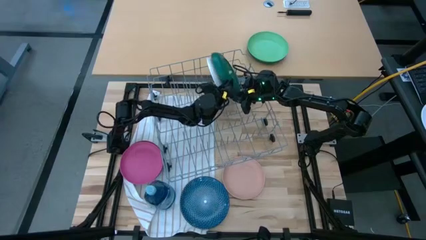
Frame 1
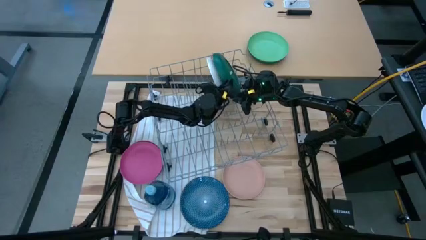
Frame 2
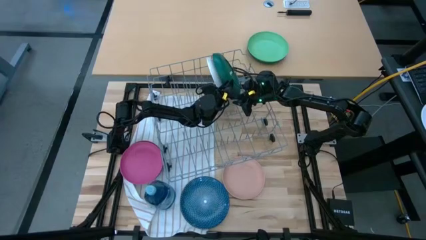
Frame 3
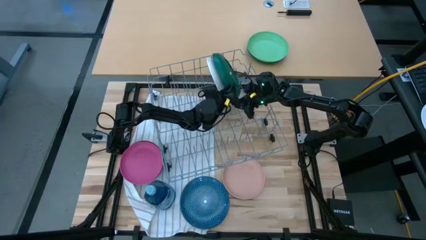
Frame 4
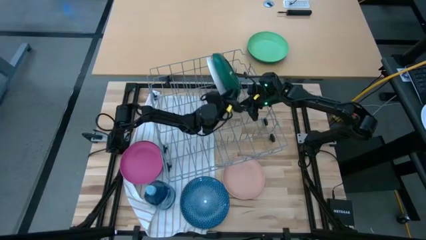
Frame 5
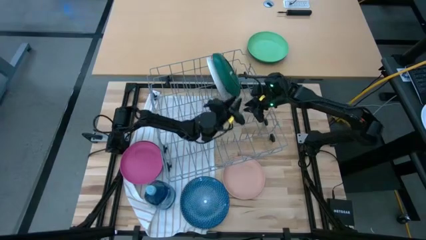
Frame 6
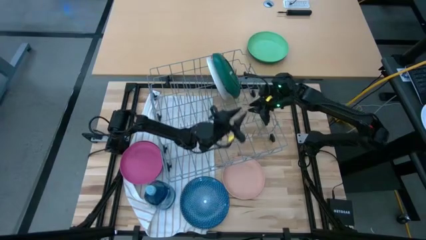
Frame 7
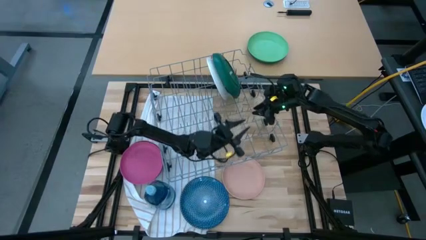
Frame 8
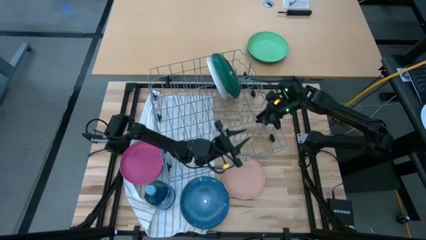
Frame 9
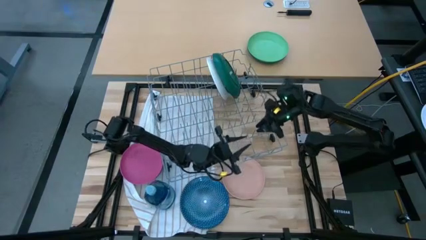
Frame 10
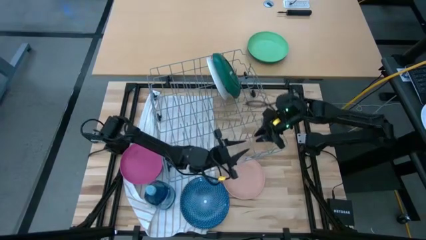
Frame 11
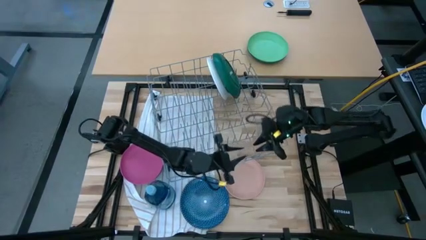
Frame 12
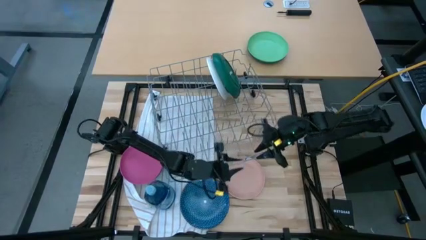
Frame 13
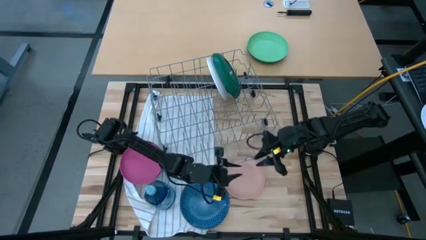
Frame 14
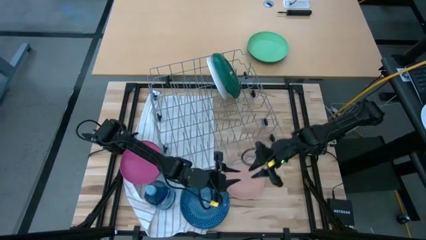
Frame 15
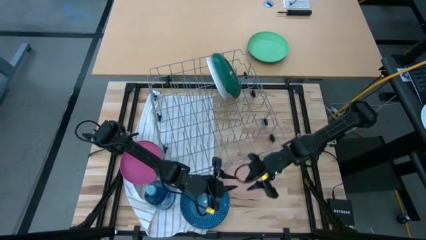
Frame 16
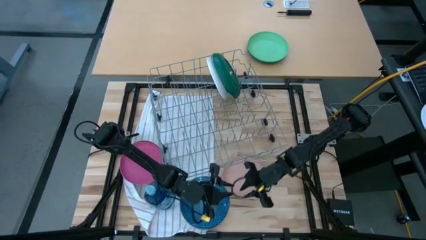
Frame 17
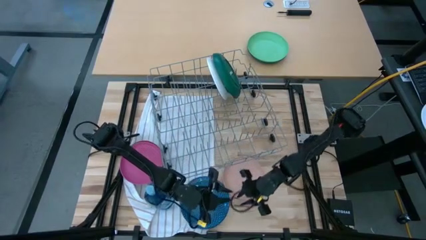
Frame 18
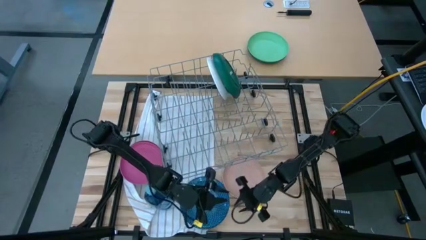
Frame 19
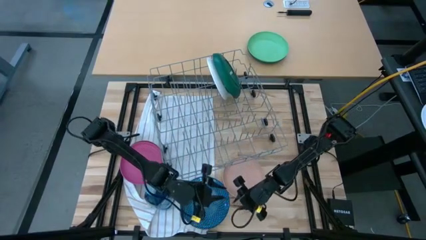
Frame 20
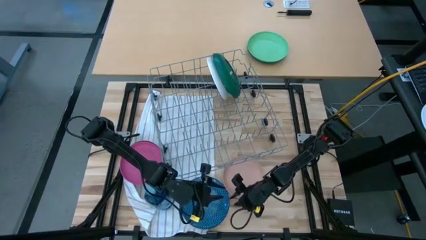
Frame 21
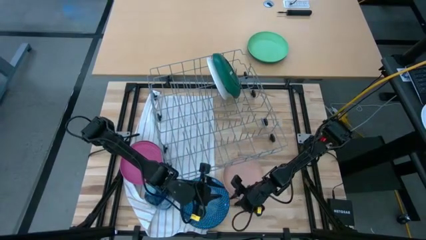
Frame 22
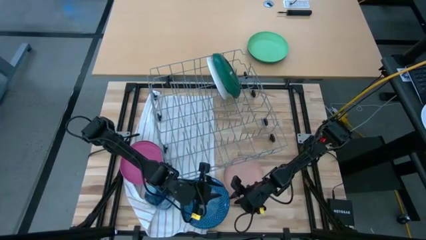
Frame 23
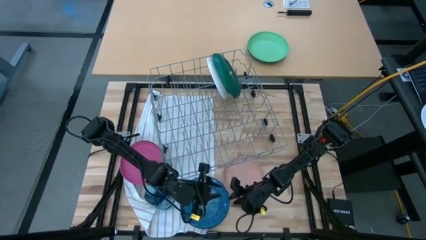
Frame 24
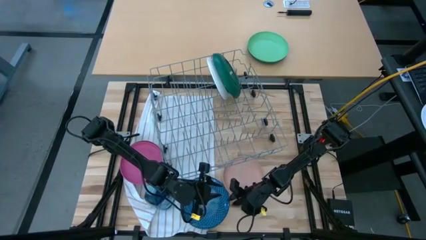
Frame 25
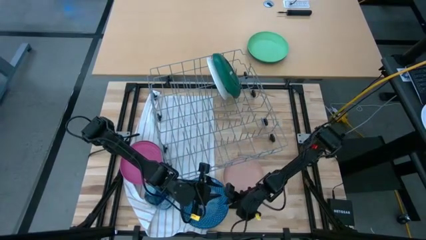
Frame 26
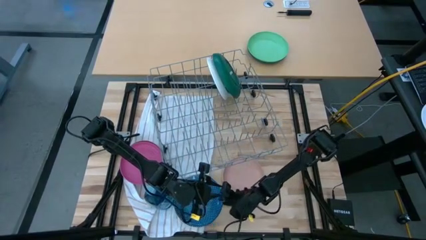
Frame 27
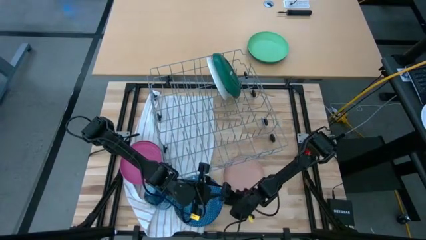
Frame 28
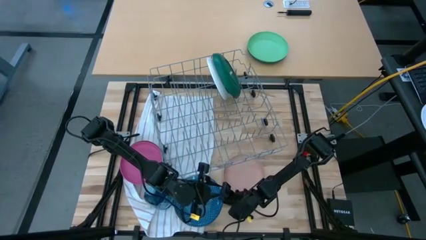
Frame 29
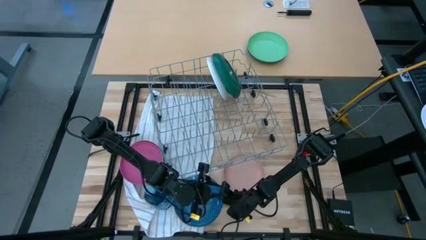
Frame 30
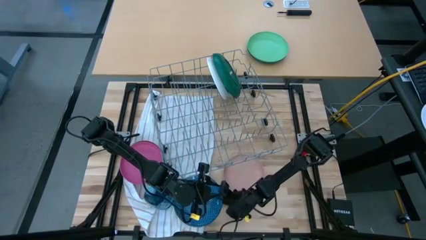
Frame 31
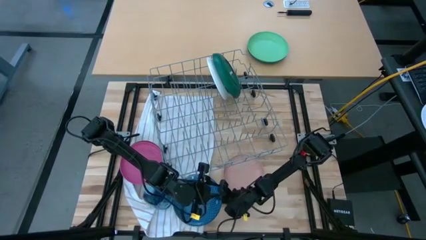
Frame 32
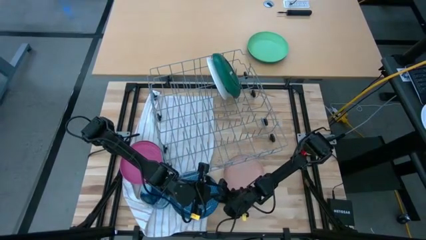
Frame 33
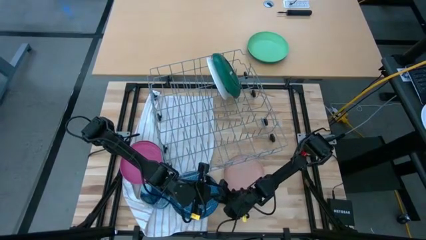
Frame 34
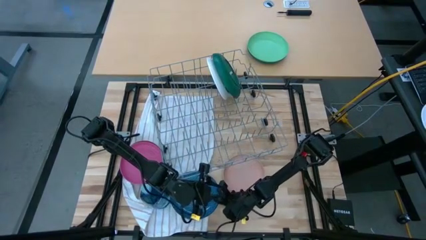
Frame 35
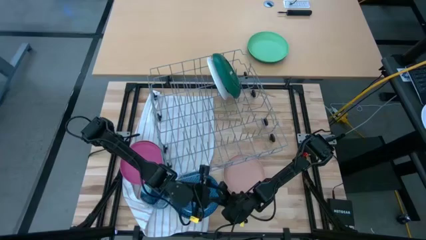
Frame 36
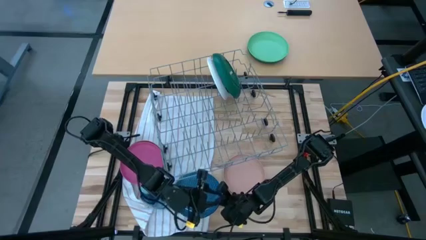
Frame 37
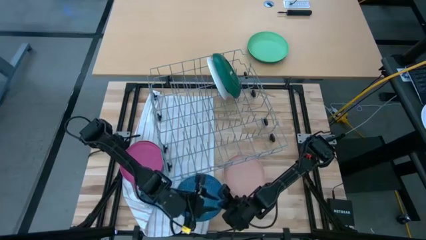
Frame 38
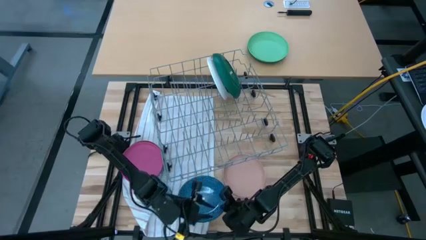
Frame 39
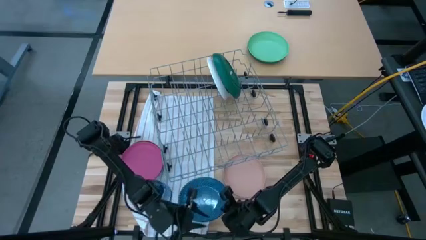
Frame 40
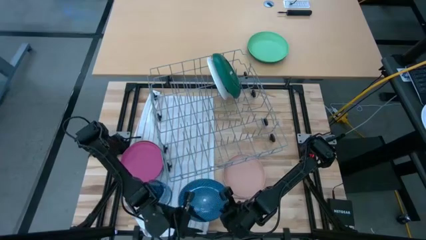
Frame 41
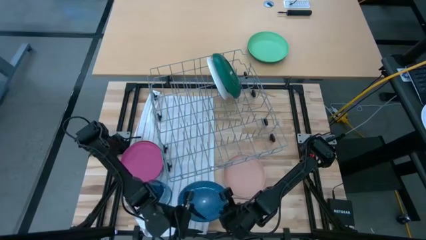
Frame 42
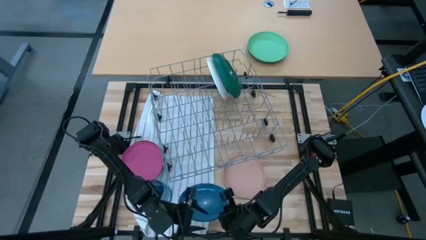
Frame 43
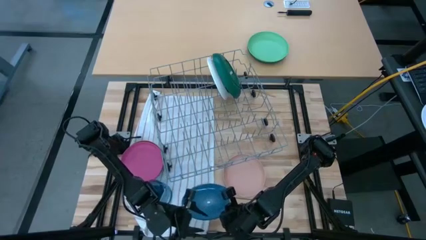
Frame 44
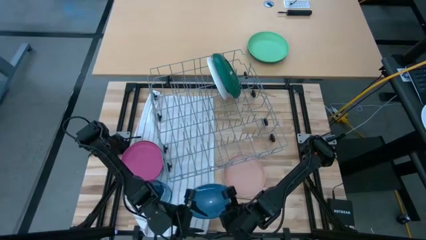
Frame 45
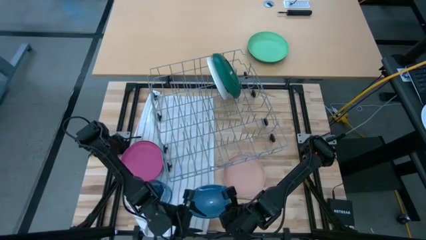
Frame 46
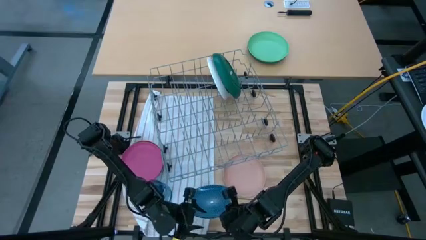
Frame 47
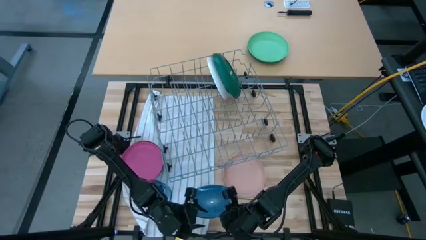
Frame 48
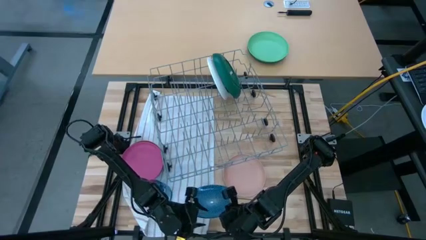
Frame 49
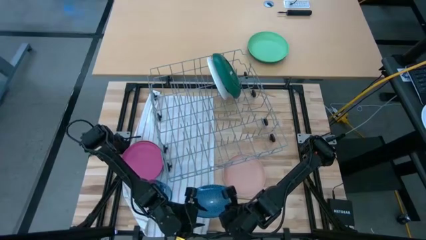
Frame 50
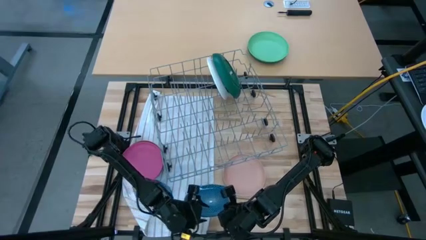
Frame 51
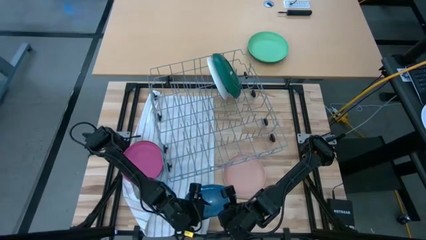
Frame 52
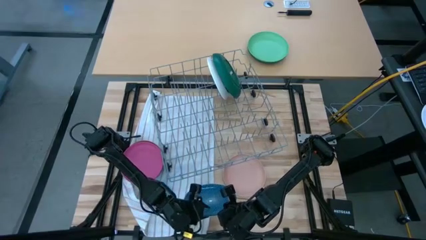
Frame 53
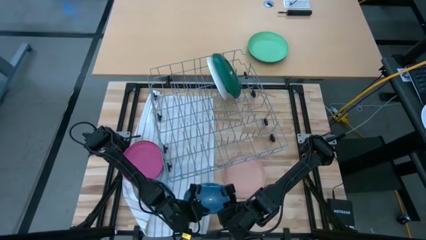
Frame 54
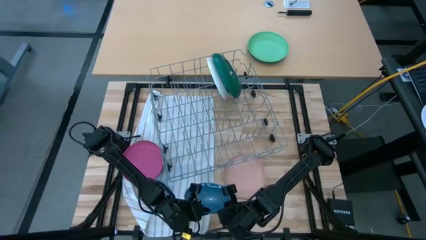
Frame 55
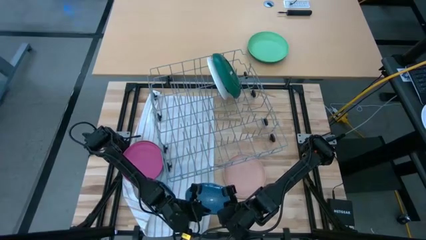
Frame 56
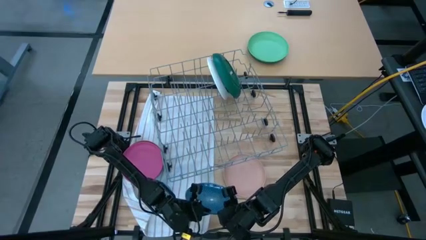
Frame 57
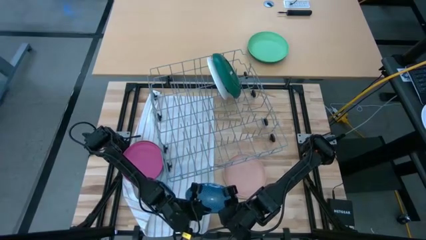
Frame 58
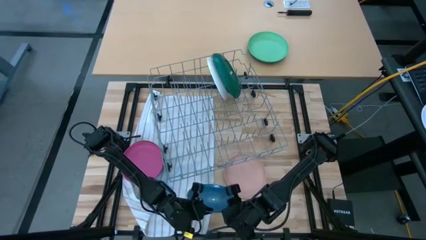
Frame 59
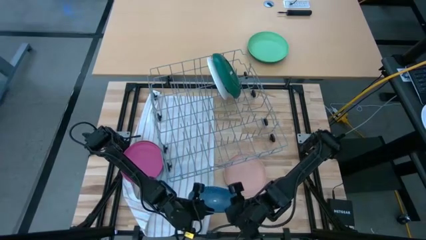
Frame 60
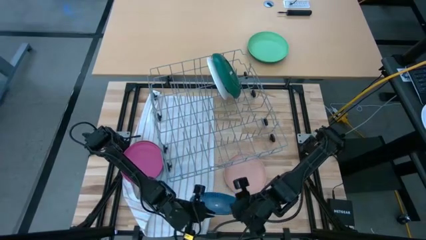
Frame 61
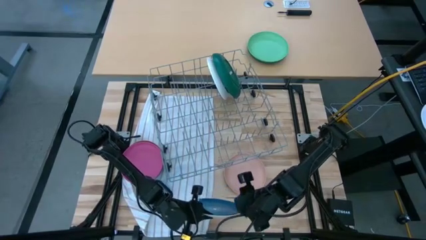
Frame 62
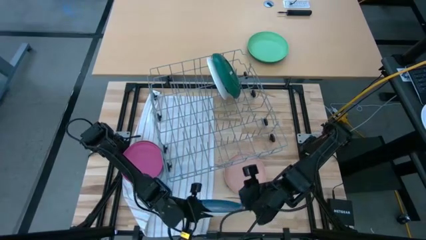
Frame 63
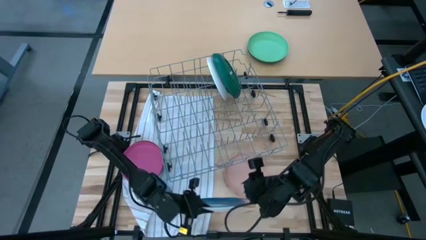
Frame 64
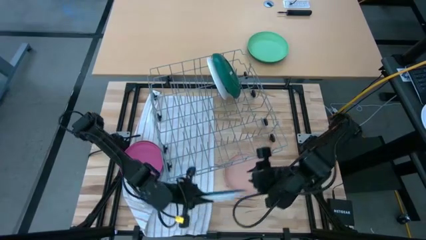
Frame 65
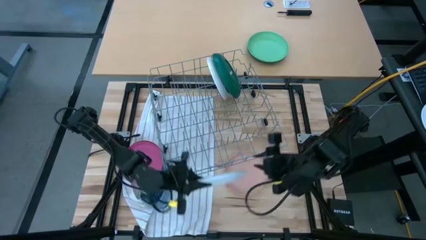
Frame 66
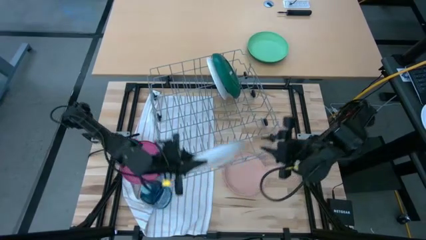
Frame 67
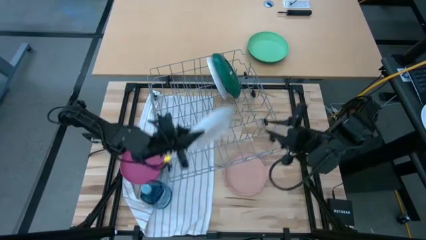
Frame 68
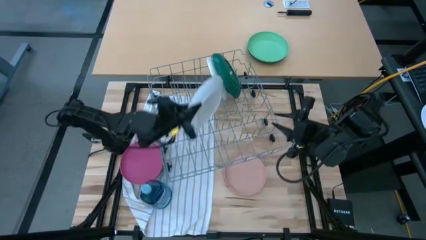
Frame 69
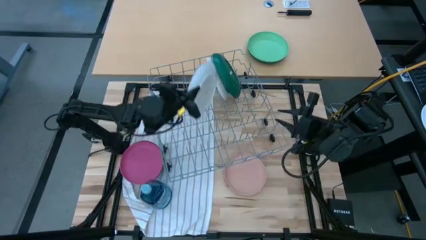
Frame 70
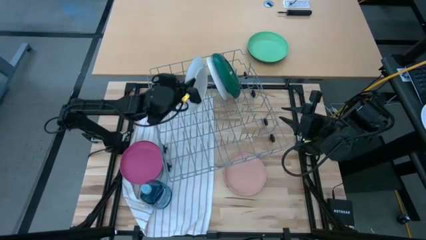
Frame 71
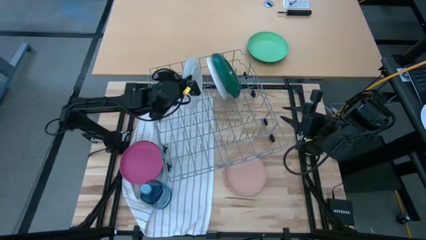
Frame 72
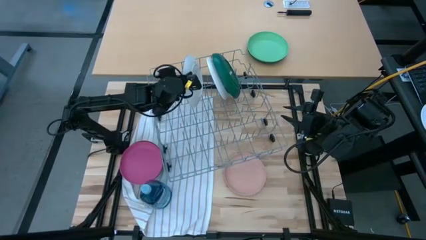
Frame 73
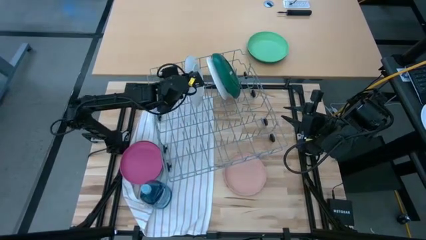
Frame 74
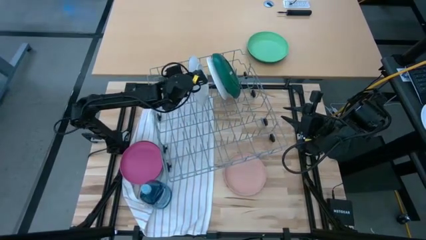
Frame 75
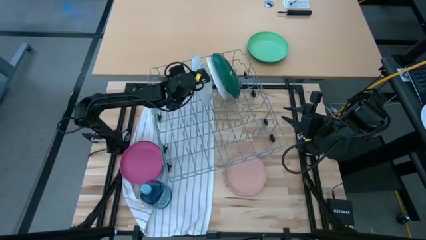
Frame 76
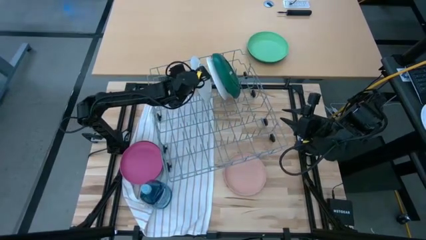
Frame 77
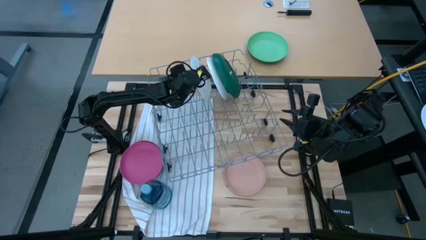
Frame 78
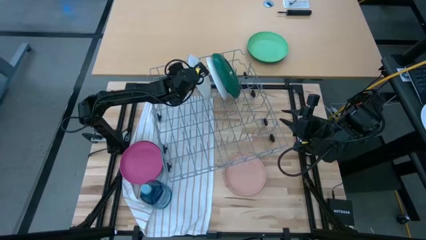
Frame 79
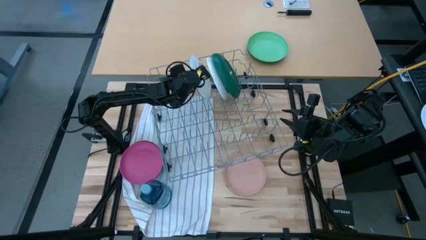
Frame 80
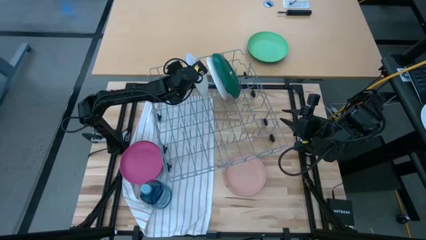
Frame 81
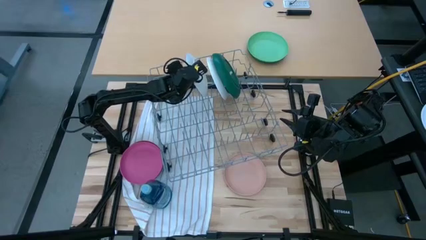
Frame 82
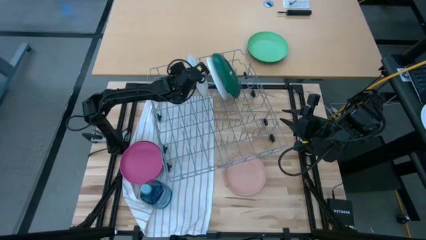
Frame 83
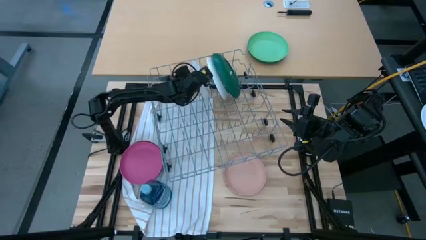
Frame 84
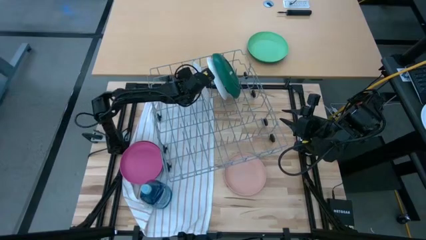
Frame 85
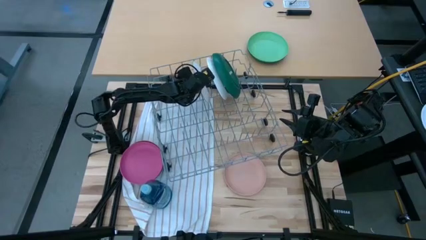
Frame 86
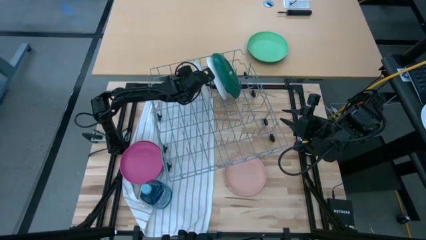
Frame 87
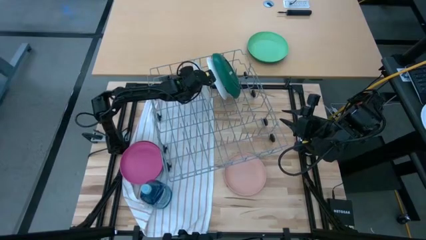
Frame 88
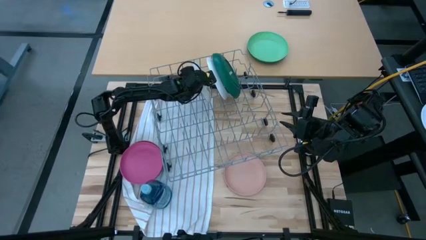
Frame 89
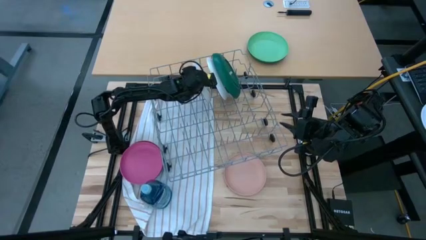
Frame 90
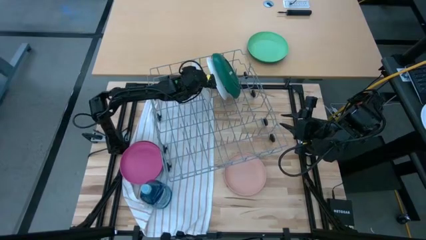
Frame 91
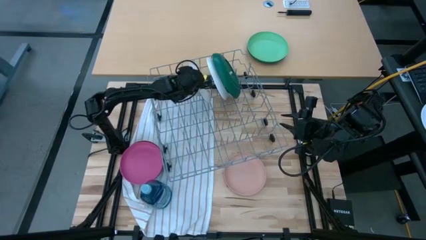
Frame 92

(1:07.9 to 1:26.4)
Task: Sort dishes
Put the blue plate into the dish rack
